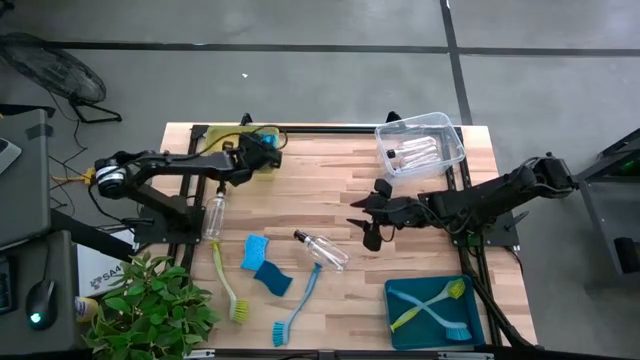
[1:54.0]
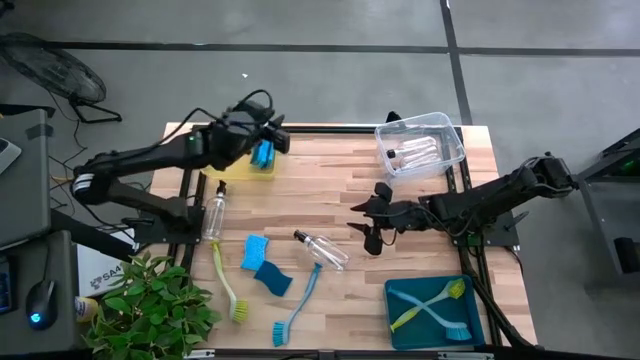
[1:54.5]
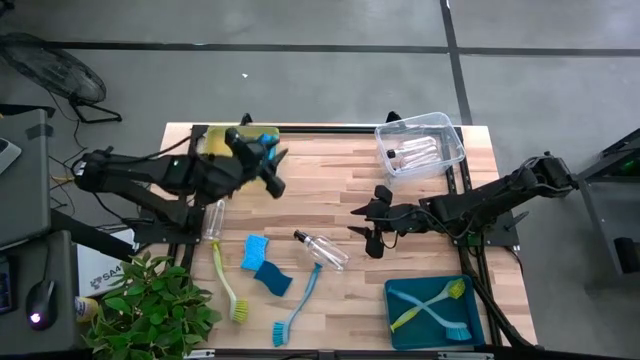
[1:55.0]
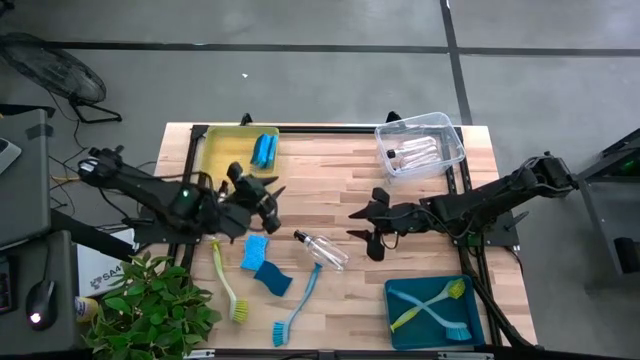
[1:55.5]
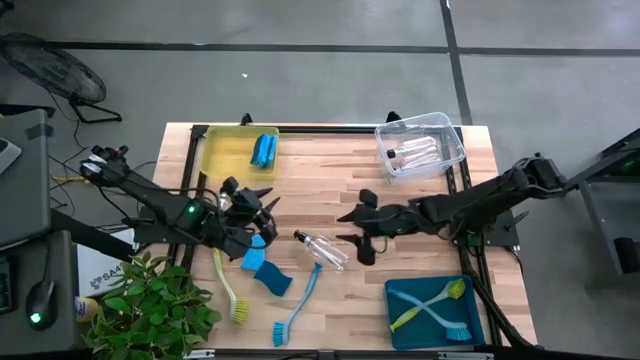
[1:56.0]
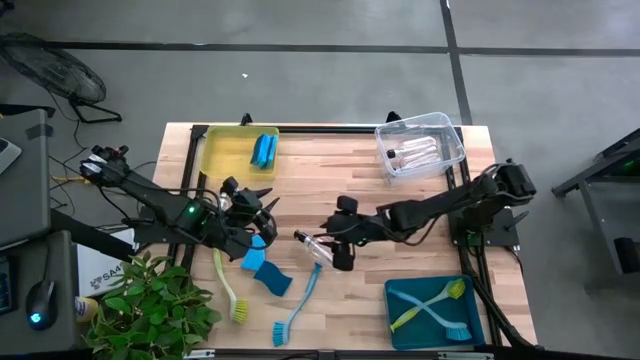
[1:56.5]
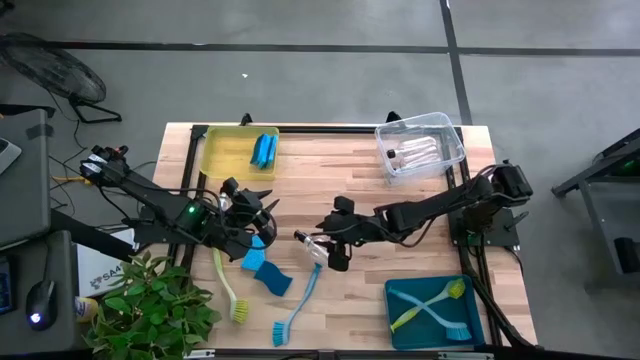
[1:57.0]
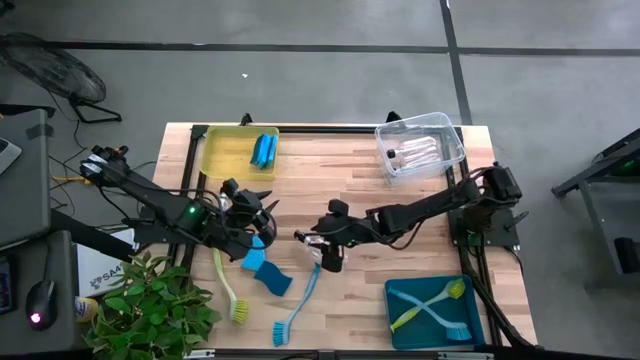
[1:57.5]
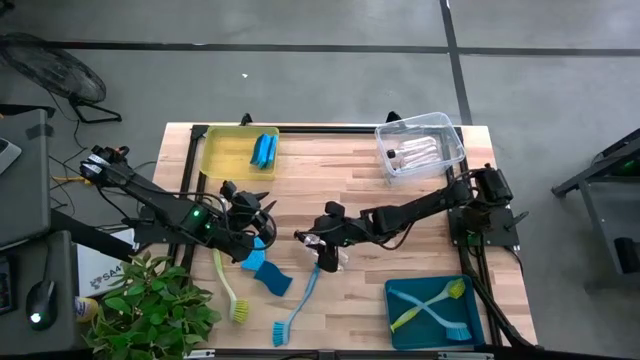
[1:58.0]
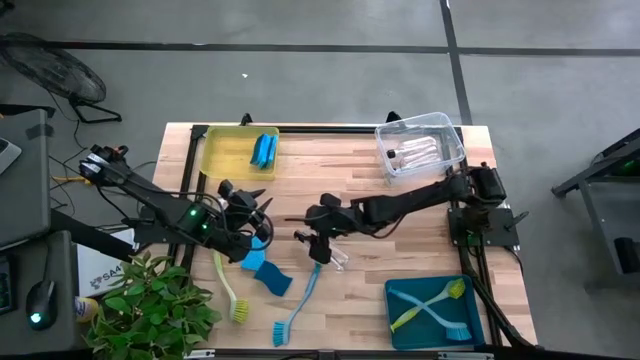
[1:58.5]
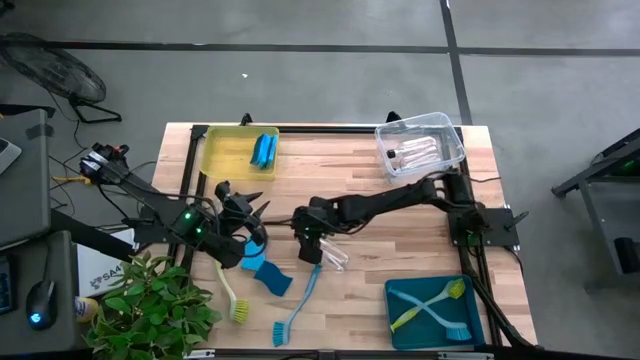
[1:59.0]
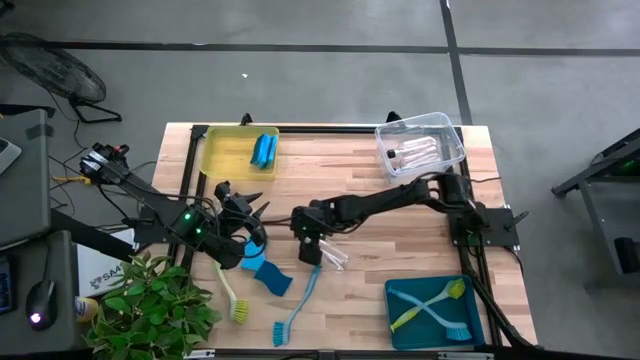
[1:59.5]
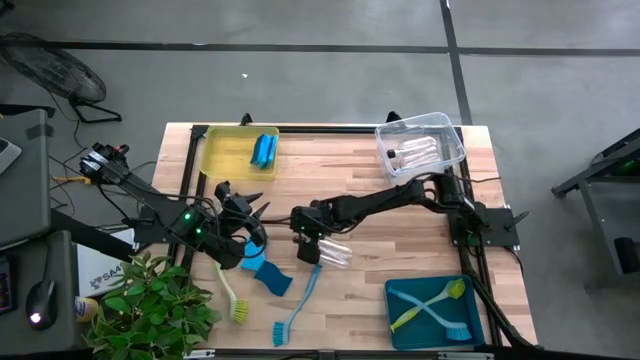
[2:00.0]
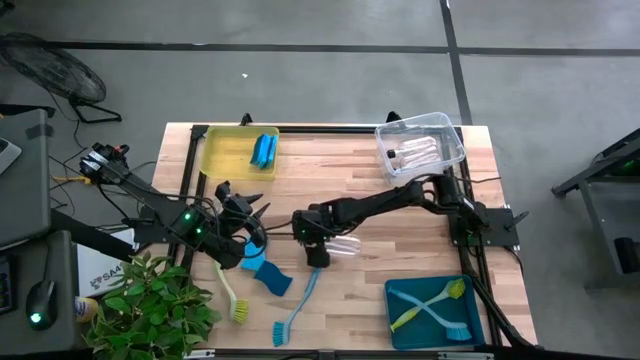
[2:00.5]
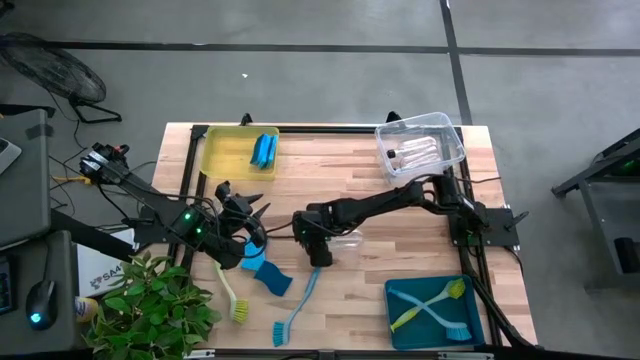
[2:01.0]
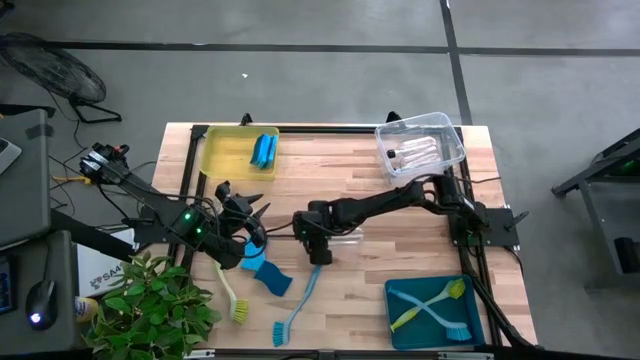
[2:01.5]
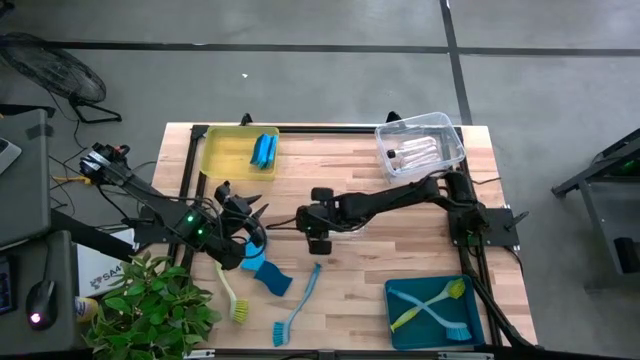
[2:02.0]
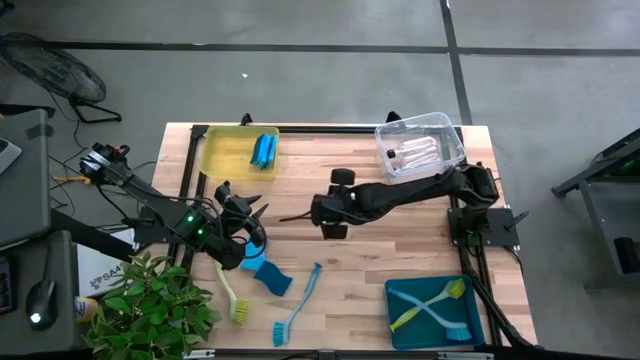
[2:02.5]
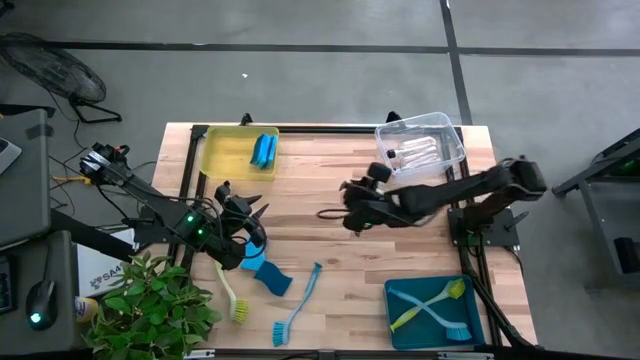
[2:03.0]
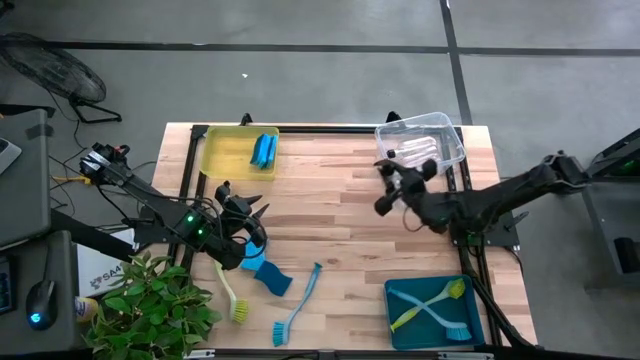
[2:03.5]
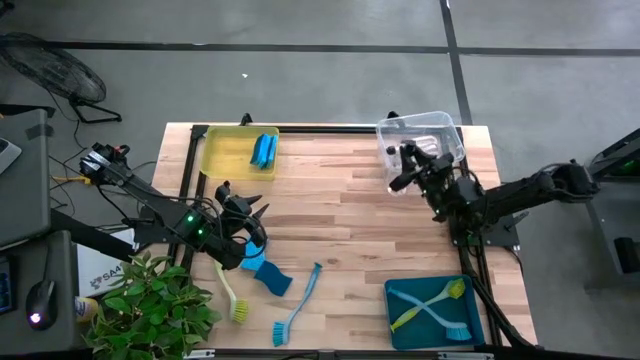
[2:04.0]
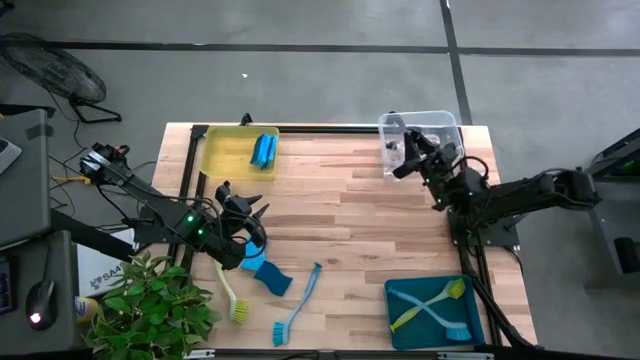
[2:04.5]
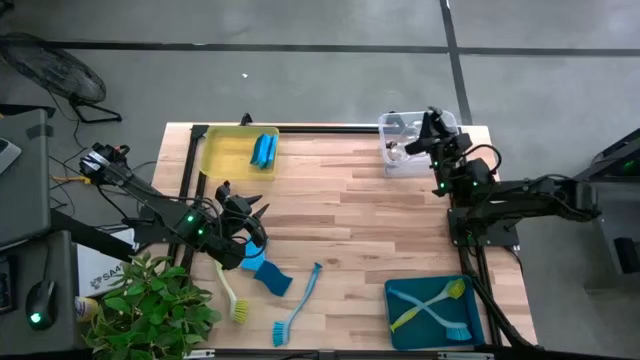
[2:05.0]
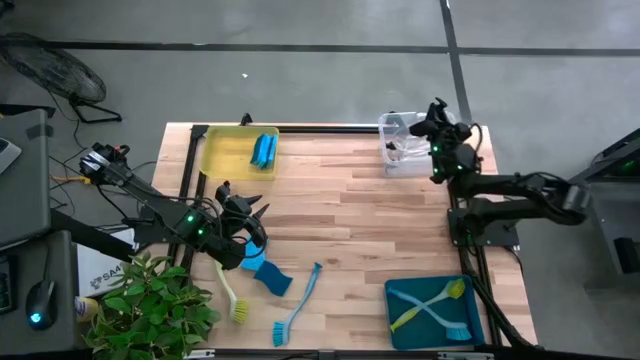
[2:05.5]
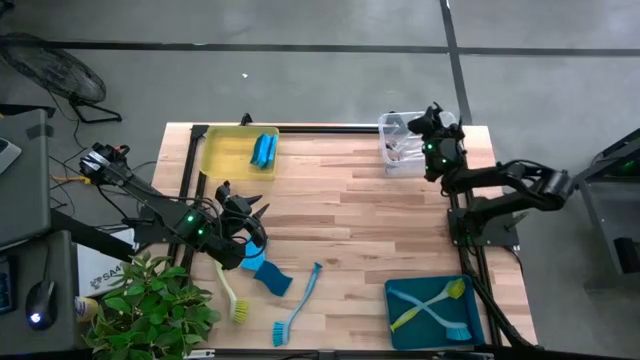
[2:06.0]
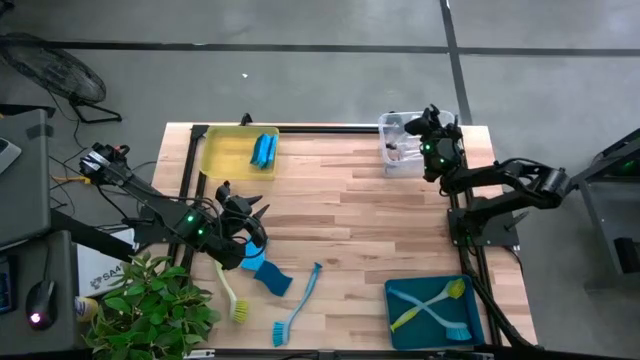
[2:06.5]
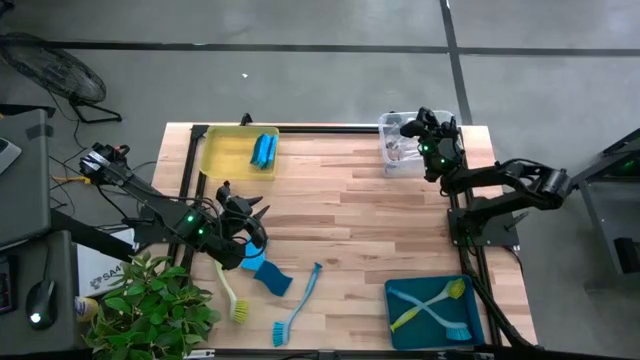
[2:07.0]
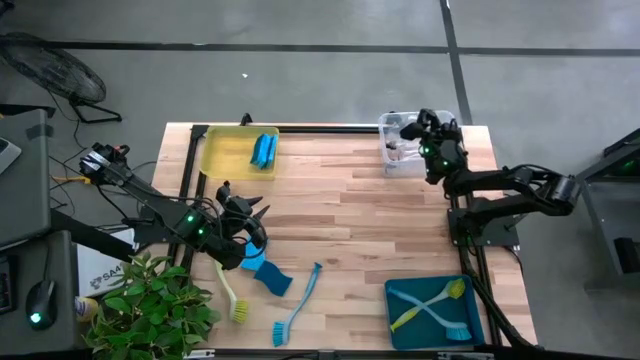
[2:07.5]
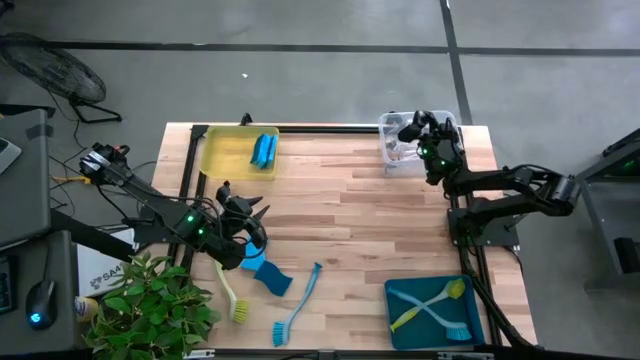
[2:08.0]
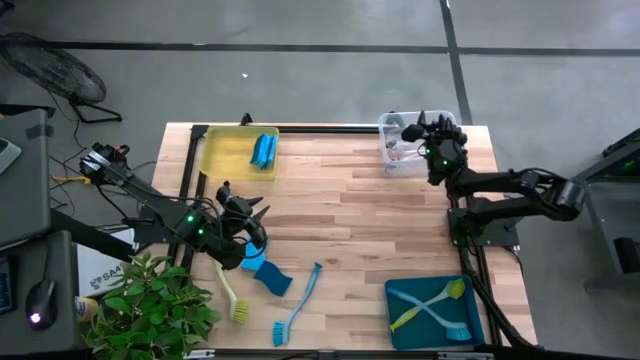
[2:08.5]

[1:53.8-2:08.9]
Task: Pick & Place Kitchen Sink Supplies
Put the transparent soap dispenser into the transparent bin

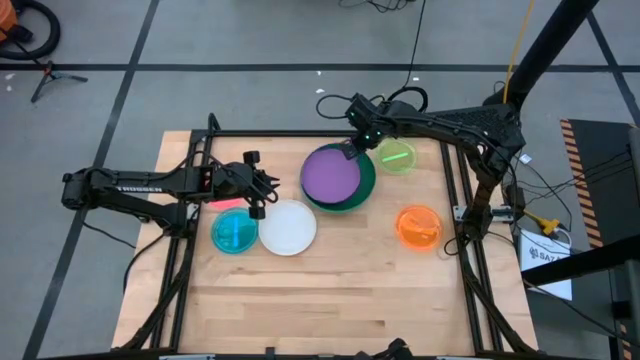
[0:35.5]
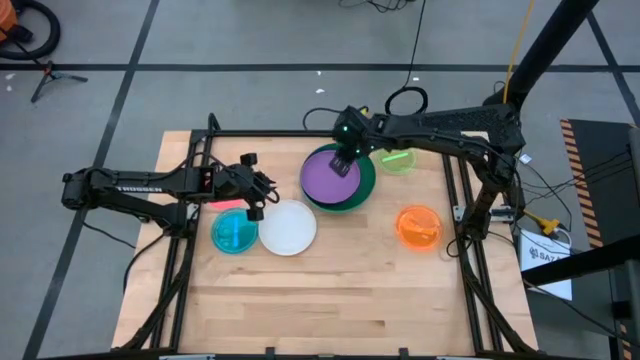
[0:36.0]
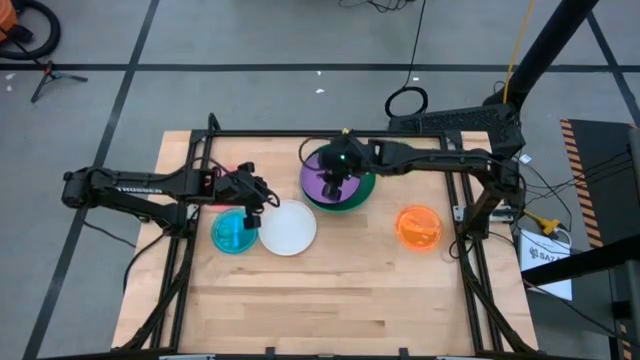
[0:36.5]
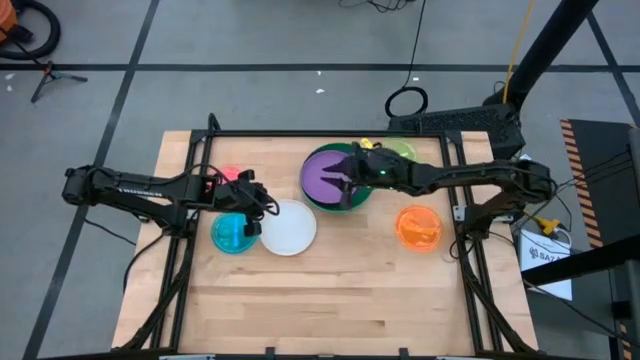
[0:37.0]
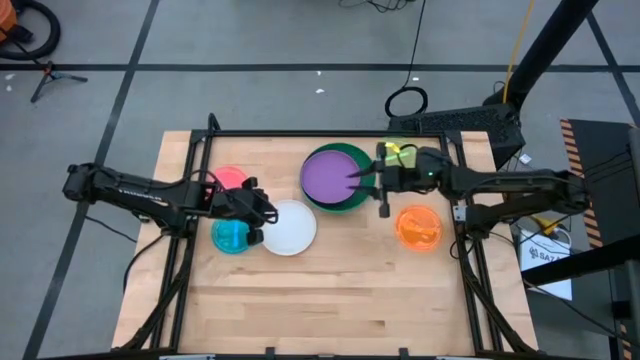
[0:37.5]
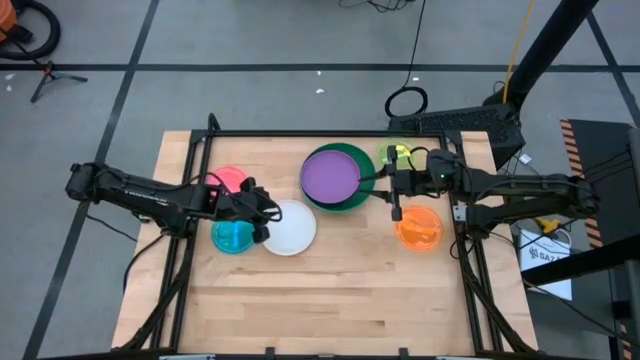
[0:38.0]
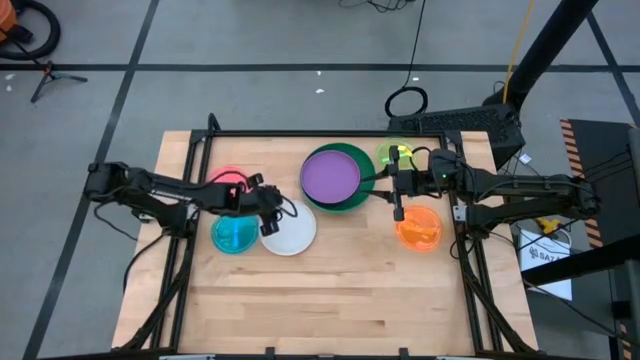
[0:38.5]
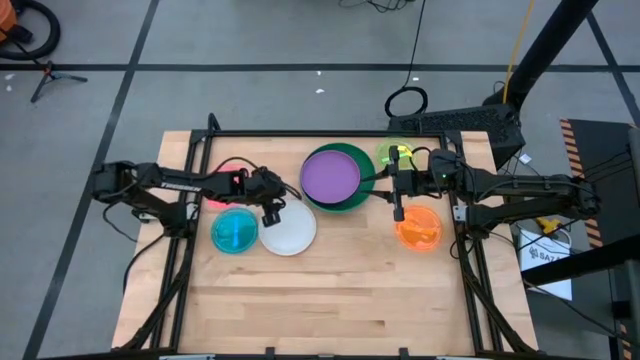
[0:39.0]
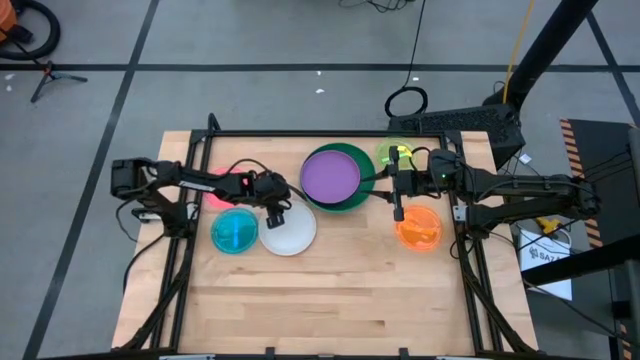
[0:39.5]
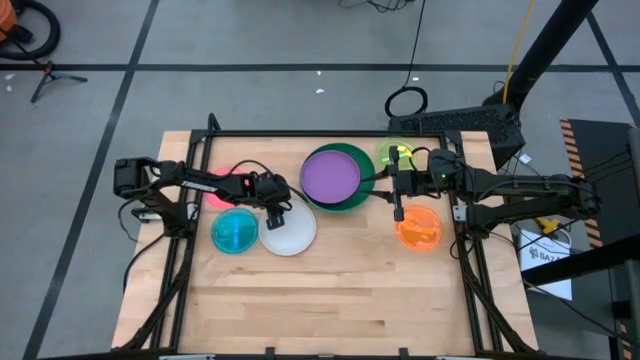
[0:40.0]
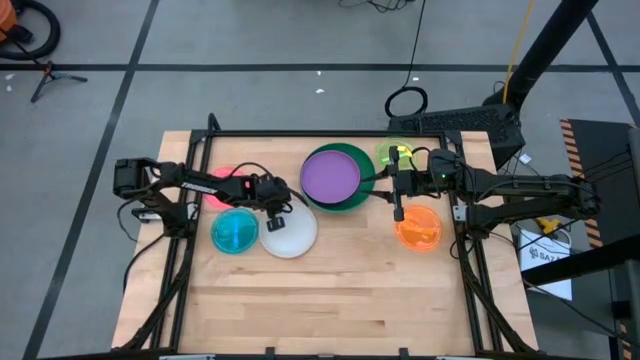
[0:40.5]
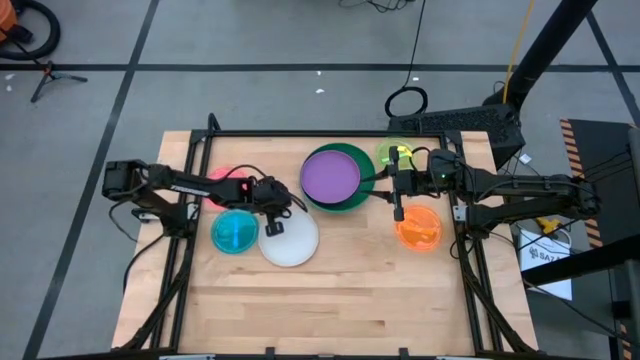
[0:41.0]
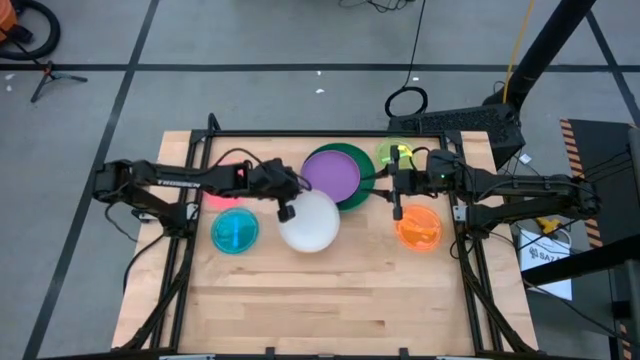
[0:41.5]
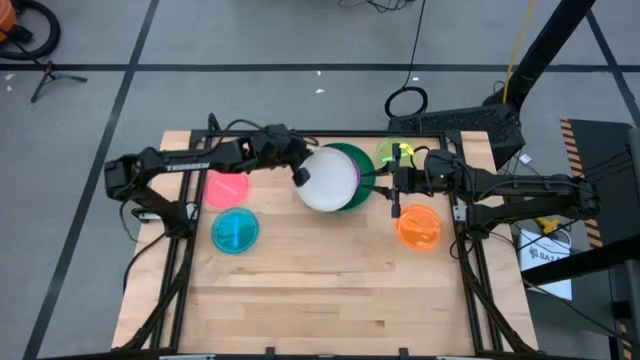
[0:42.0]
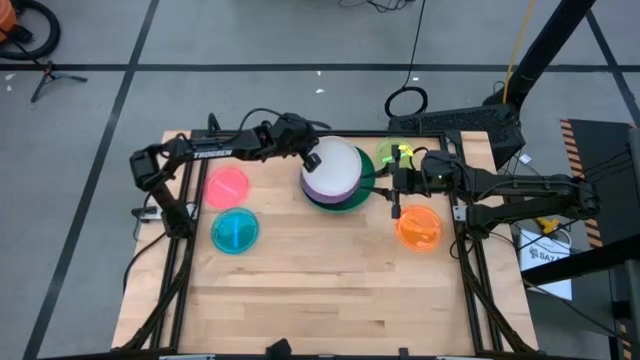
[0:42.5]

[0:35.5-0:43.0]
Task: Stack plastic plates
Stack the white plate on top of the violet plate
